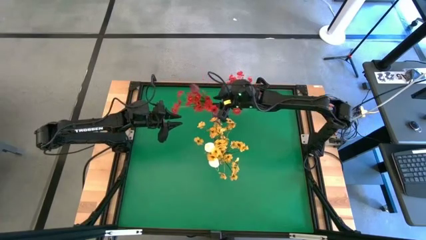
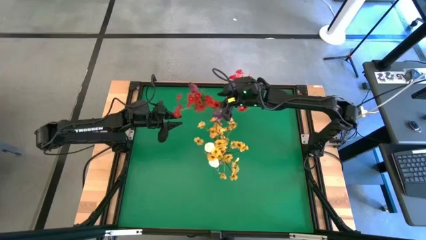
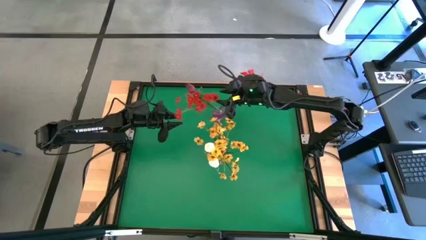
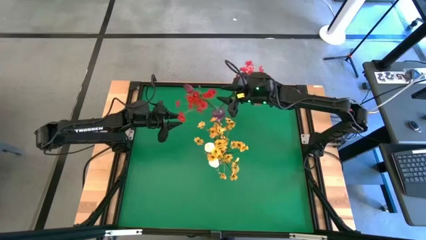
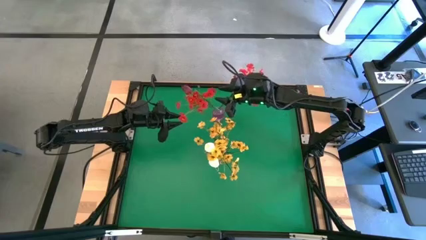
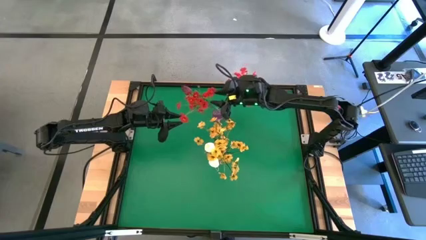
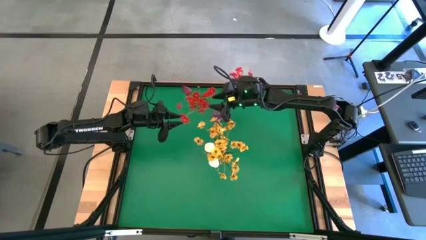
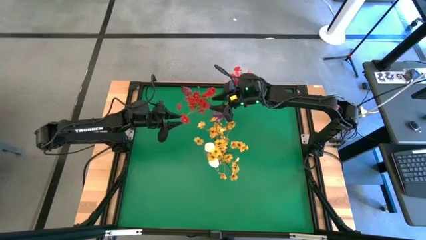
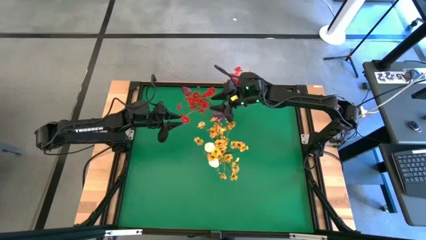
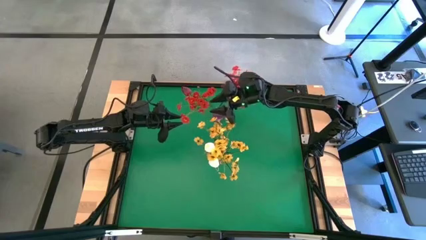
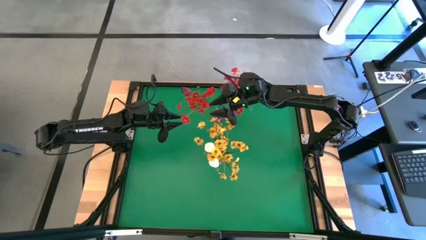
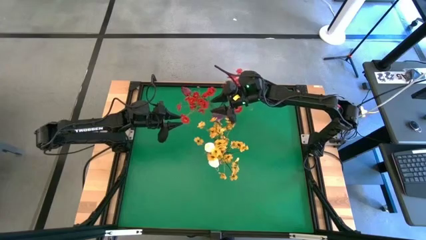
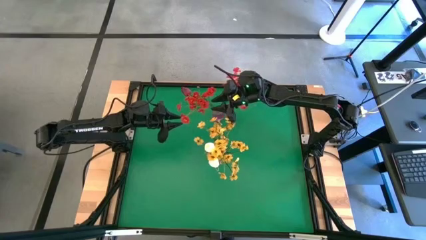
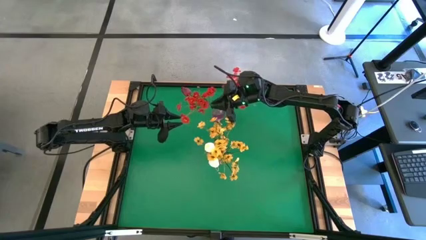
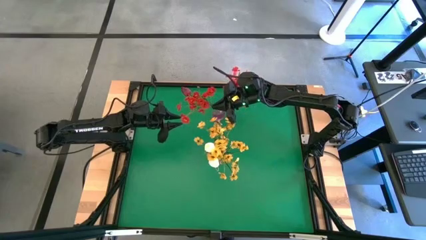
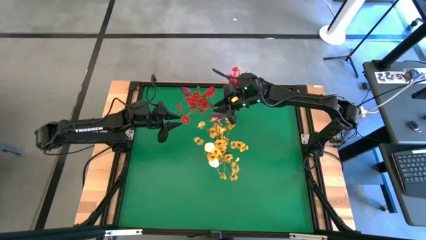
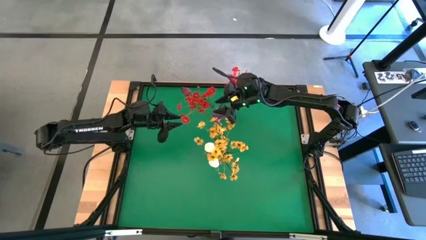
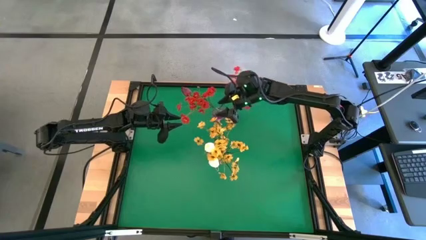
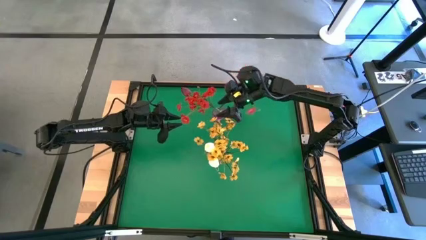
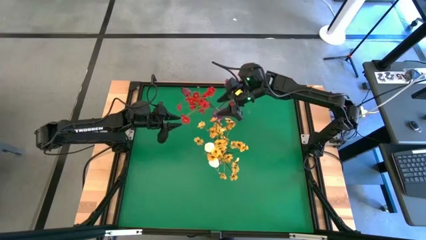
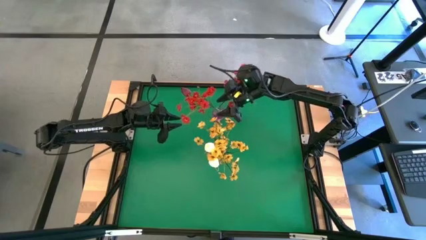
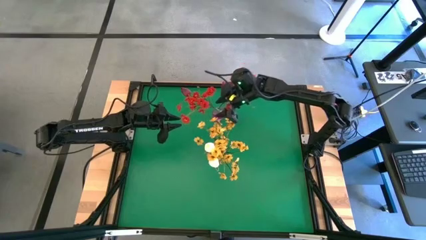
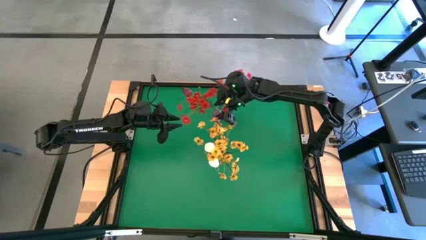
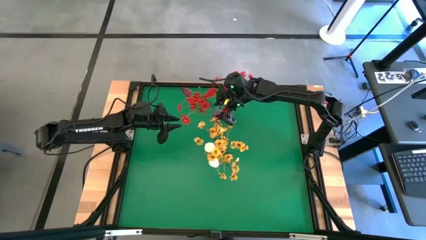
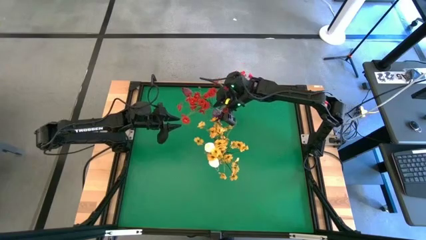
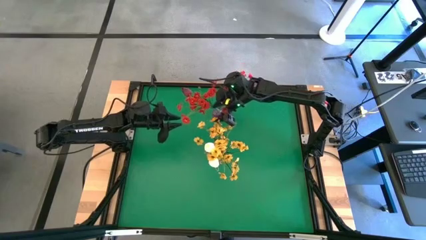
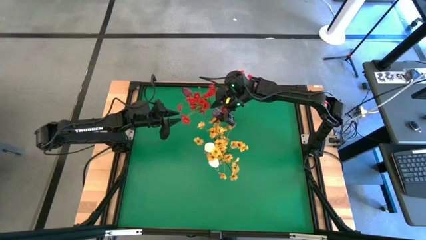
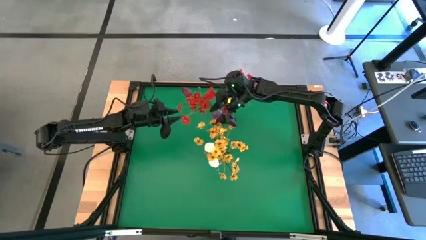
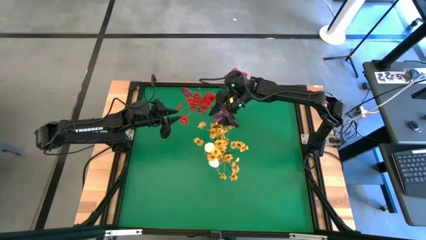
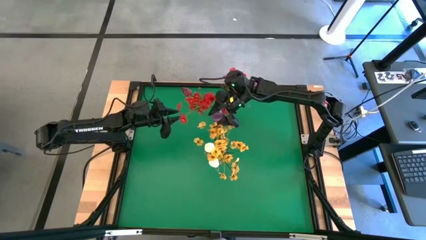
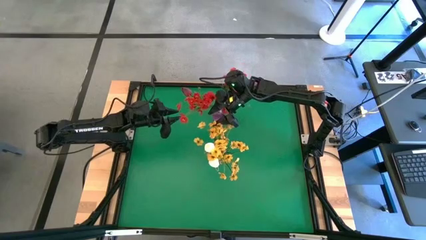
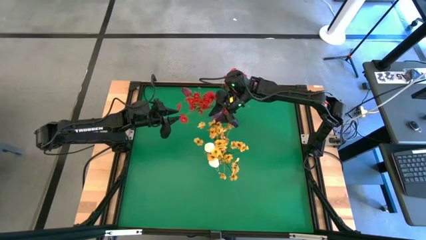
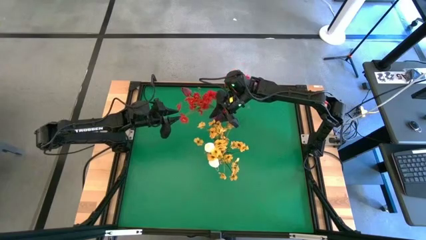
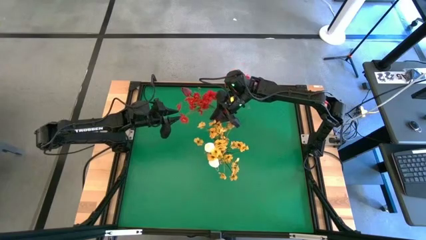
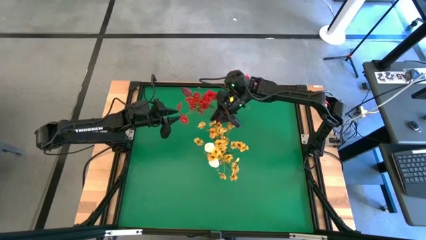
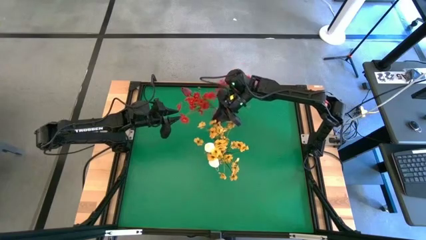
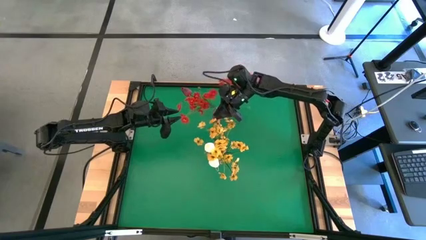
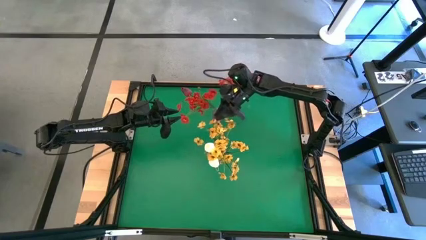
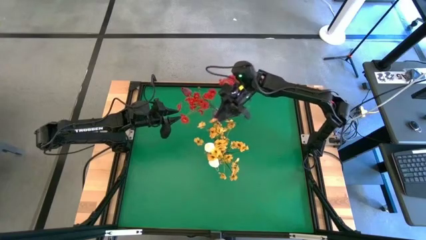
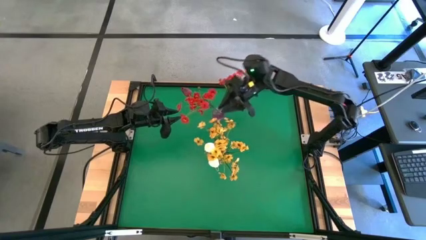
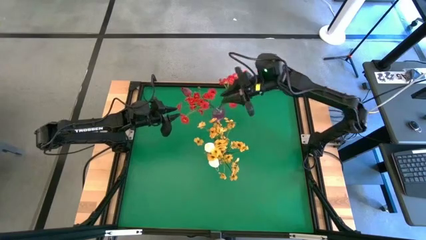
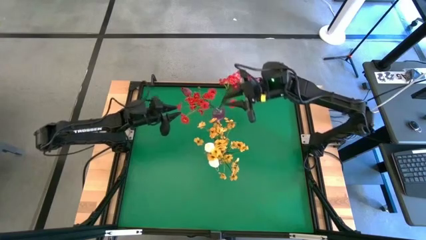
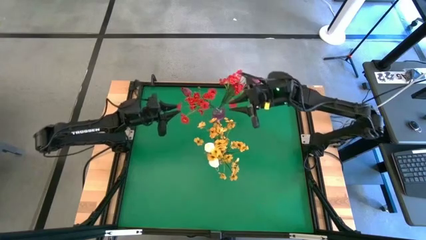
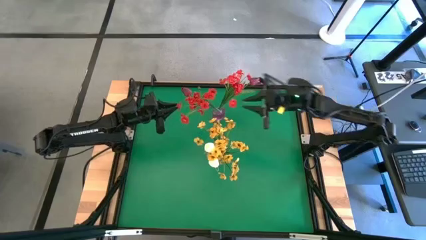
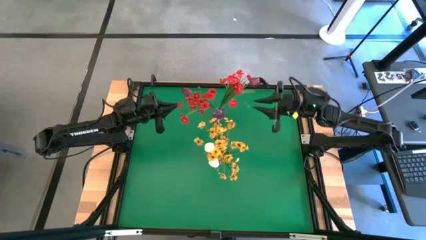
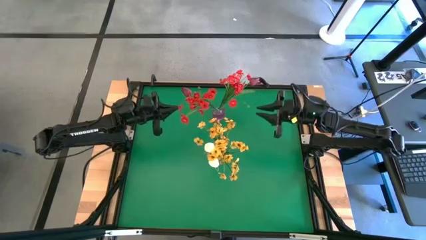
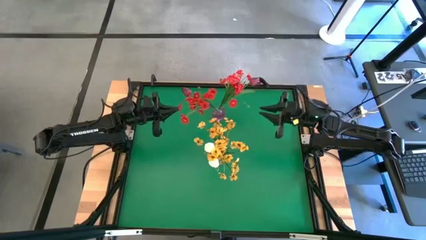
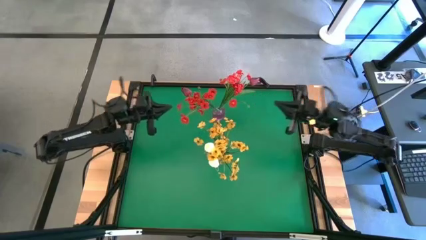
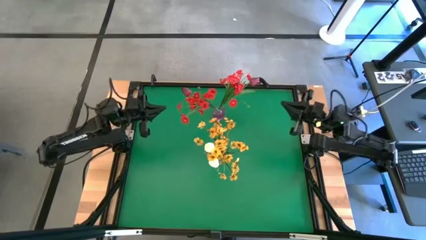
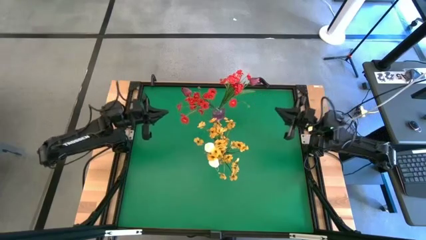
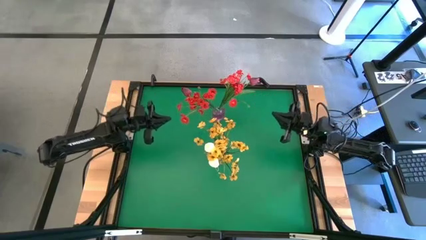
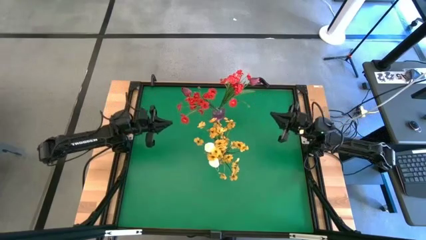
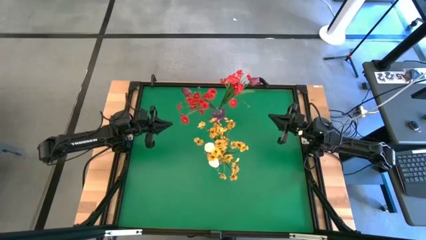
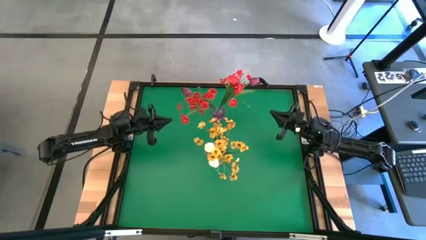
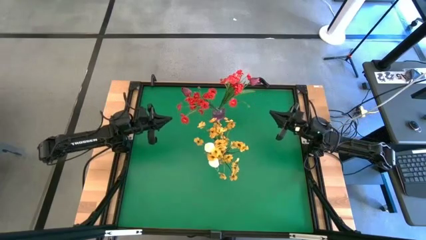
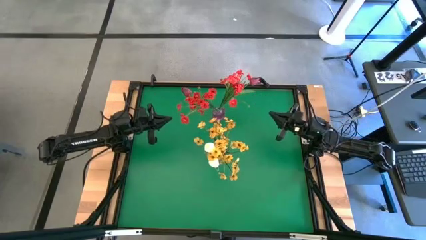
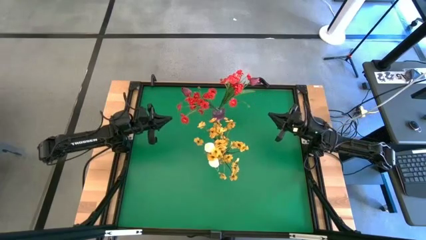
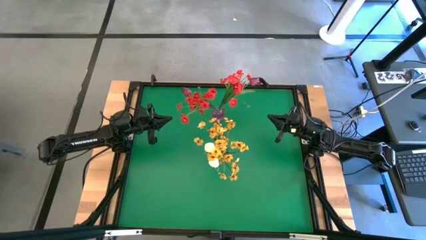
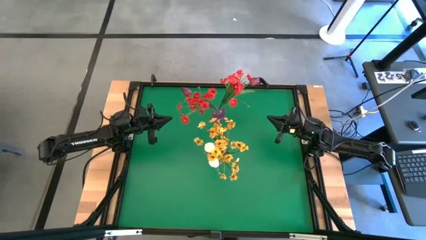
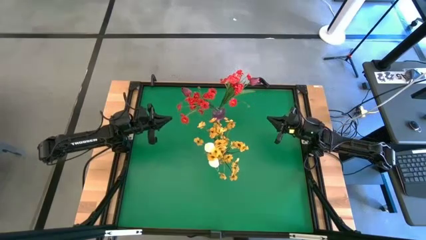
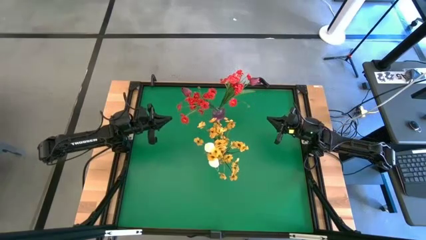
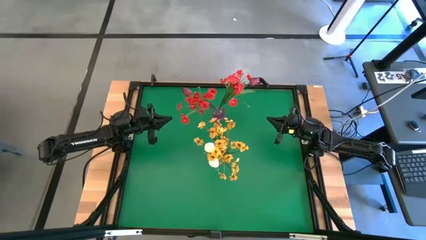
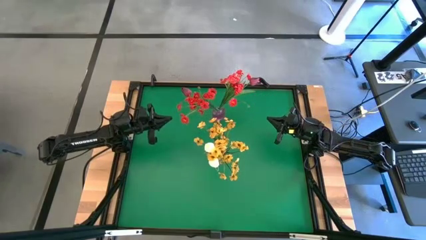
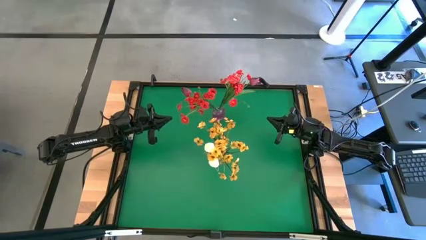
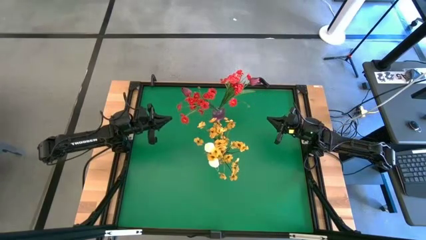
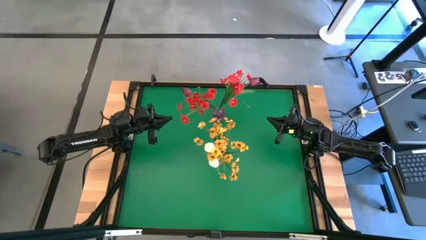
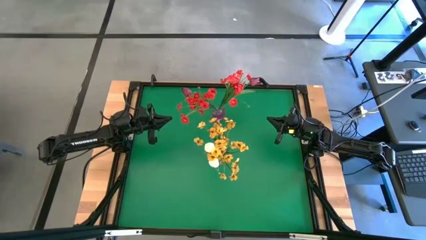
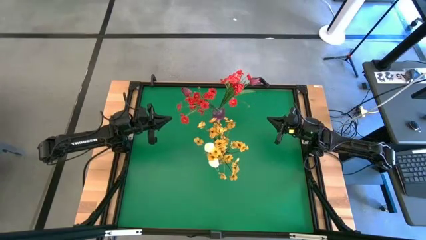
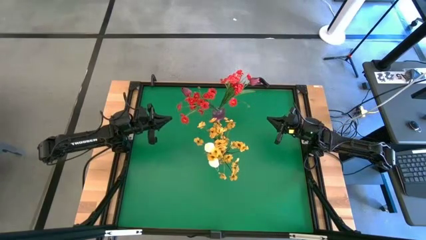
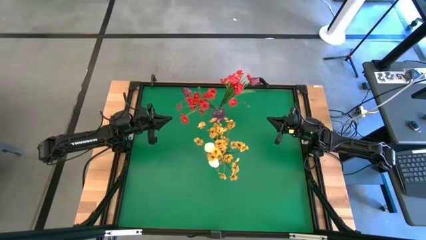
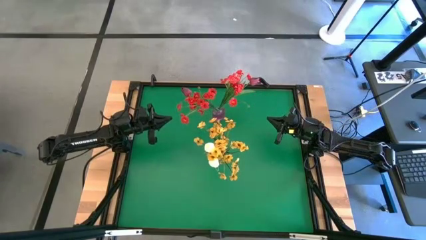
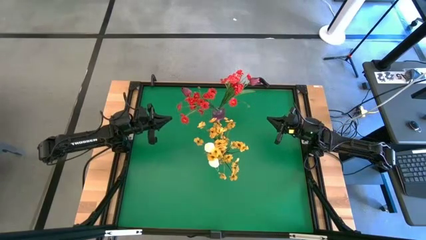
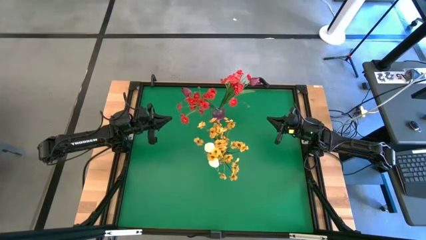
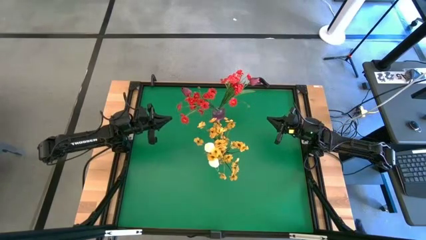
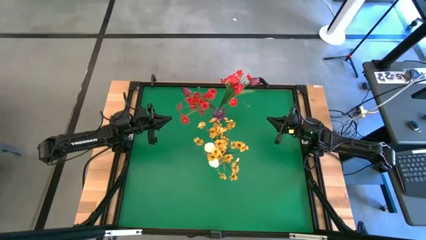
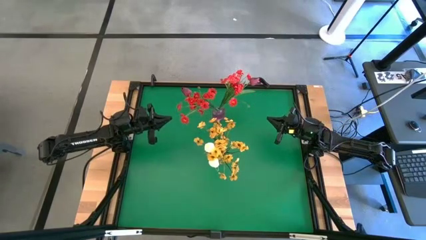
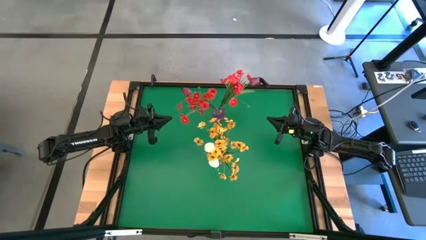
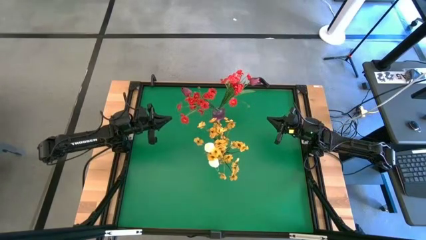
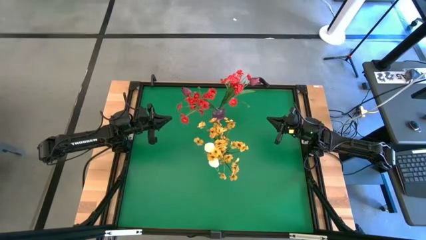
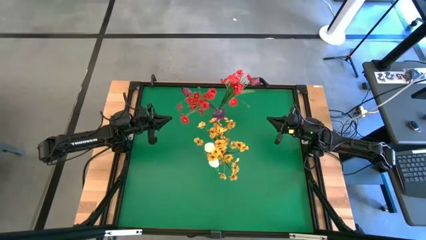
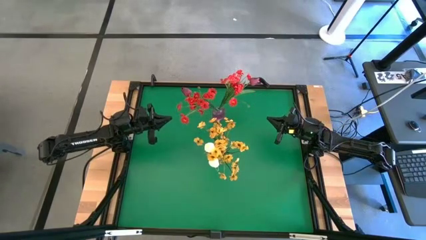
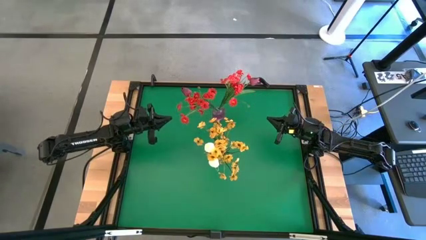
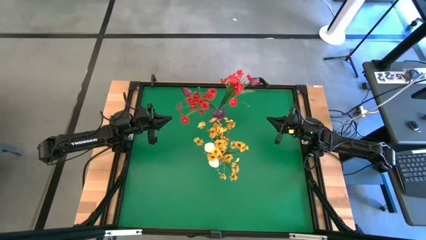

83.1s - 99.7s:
Task: Sort flowers into vase by color
Return to Home Position

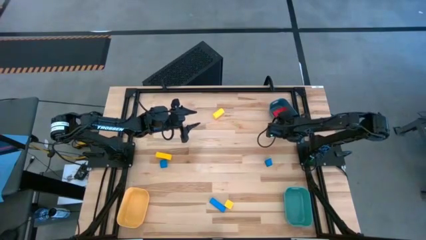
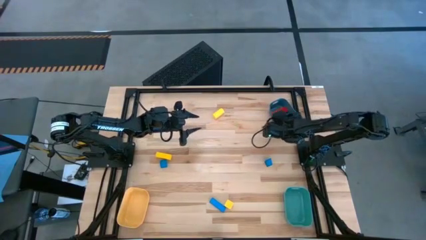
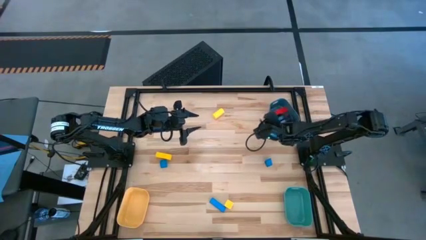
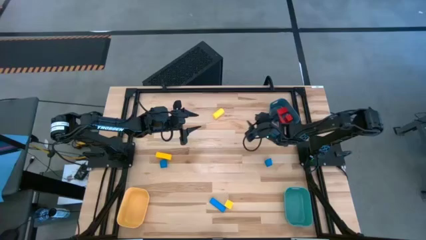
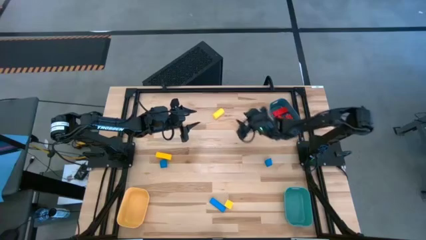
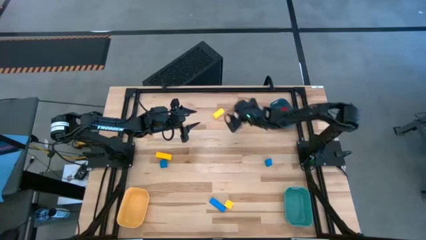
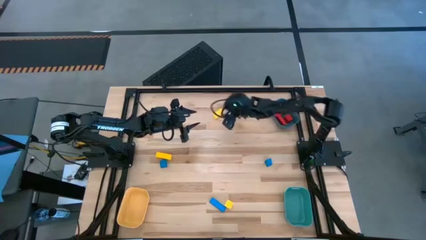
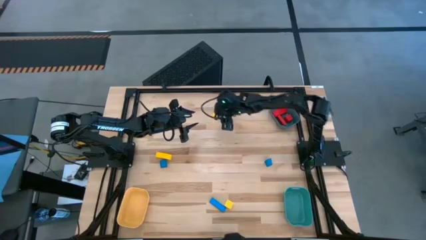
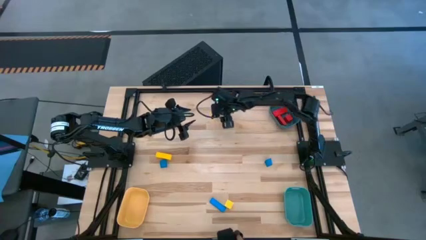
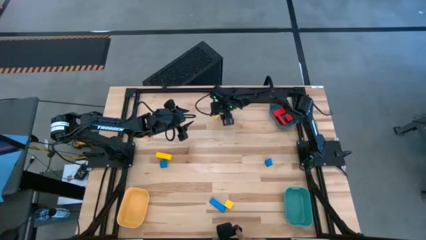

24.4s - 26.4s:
Task: Sort & place blocks by color
Put the top yellow block into the yellow bin
